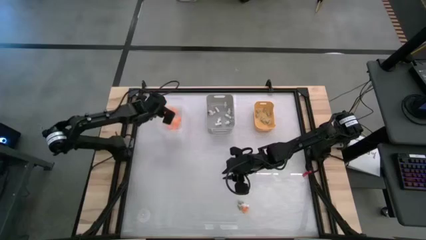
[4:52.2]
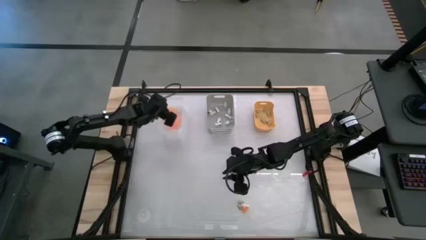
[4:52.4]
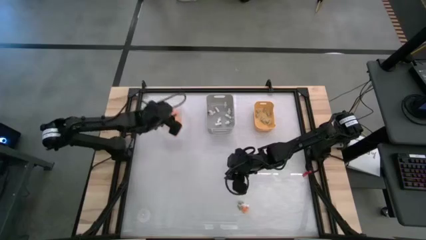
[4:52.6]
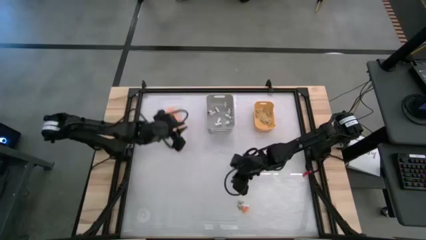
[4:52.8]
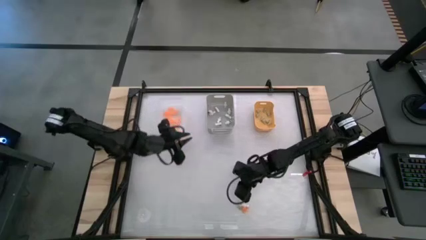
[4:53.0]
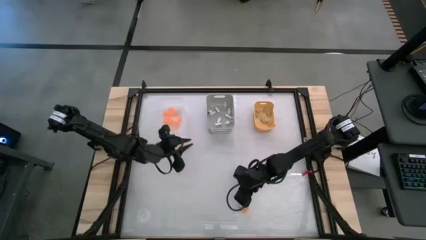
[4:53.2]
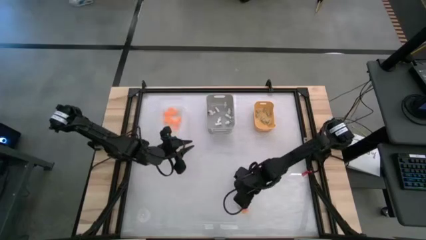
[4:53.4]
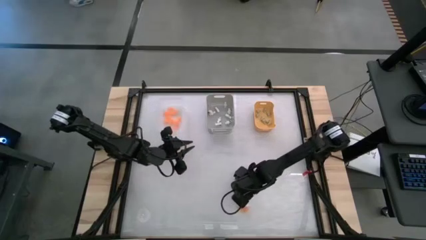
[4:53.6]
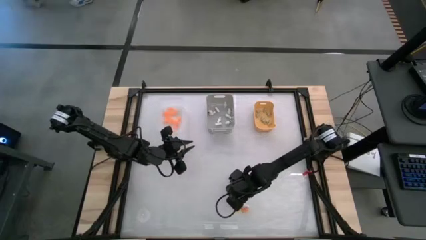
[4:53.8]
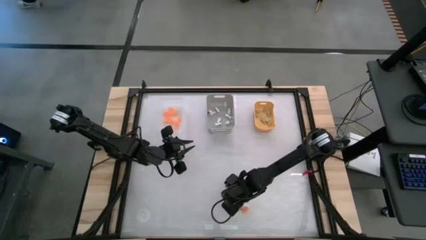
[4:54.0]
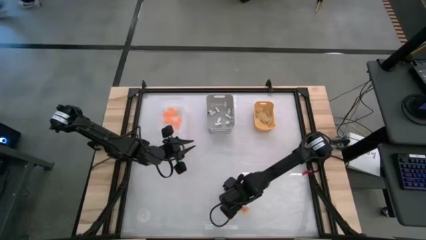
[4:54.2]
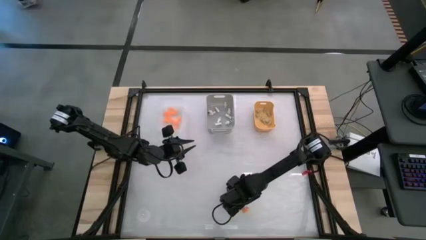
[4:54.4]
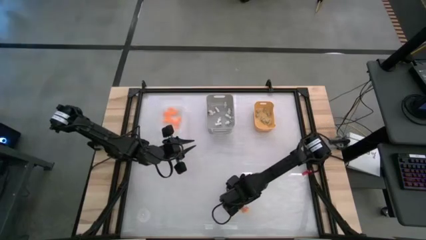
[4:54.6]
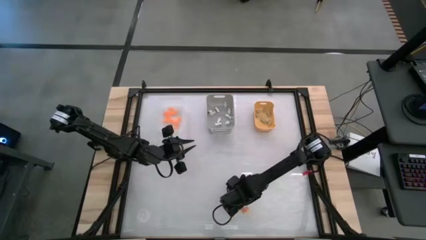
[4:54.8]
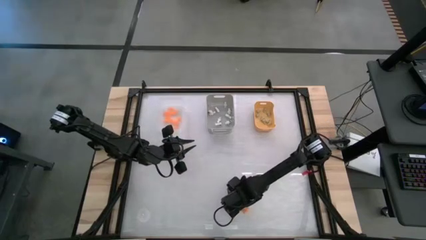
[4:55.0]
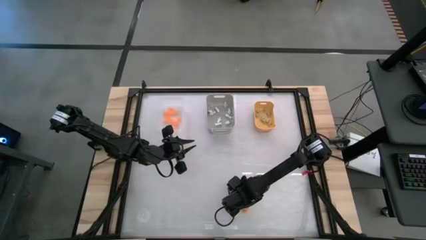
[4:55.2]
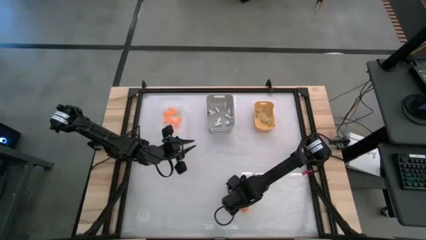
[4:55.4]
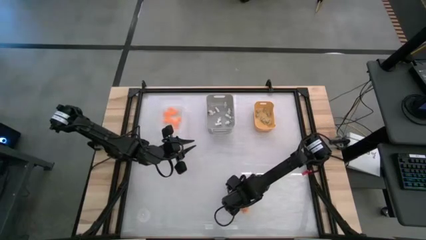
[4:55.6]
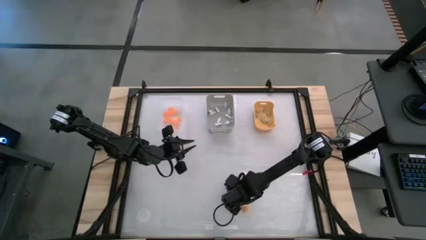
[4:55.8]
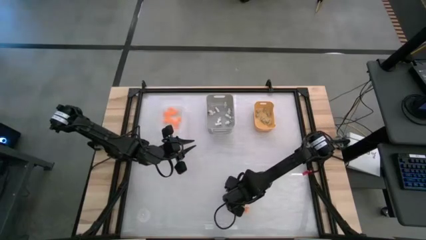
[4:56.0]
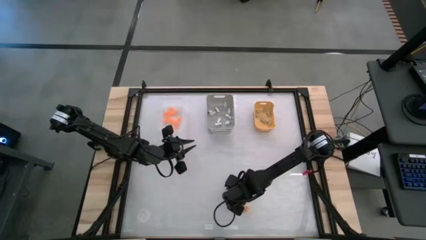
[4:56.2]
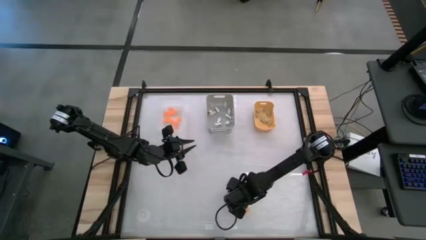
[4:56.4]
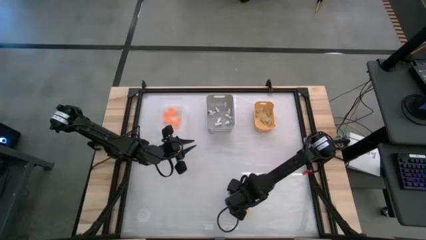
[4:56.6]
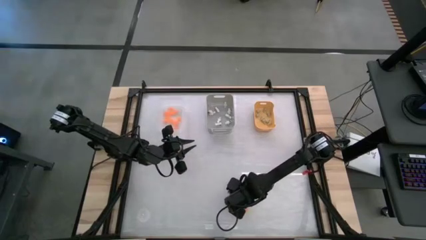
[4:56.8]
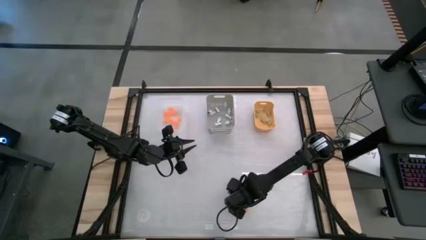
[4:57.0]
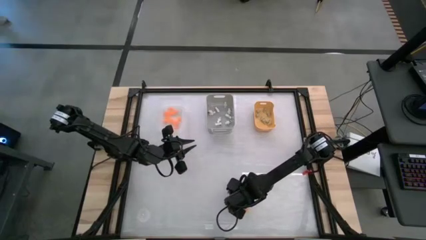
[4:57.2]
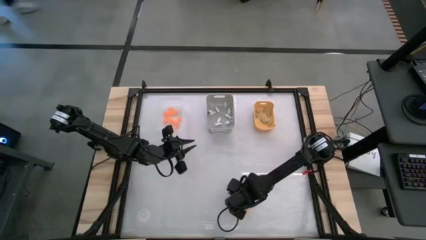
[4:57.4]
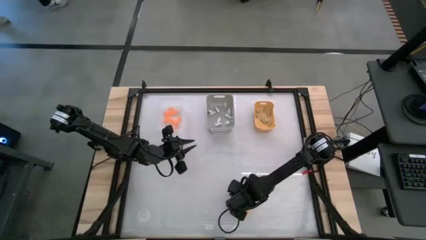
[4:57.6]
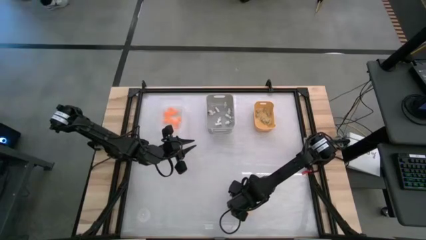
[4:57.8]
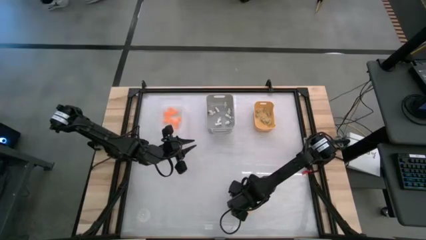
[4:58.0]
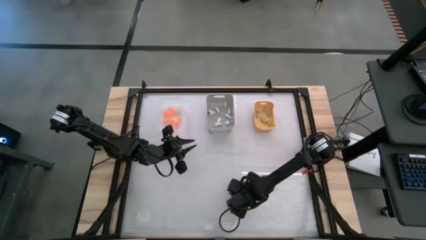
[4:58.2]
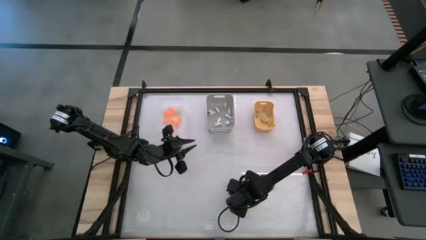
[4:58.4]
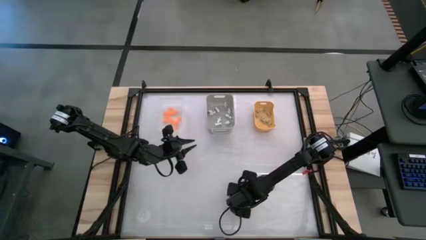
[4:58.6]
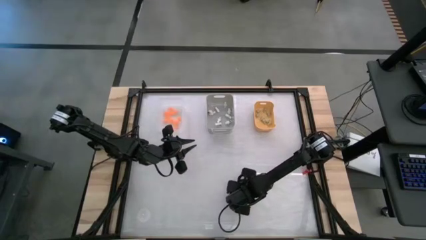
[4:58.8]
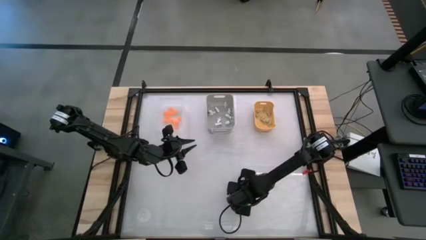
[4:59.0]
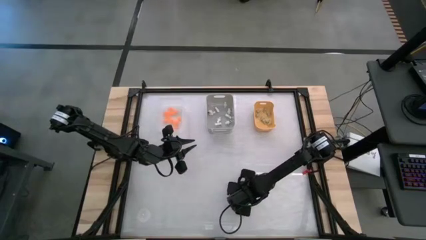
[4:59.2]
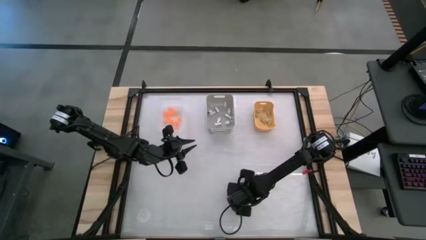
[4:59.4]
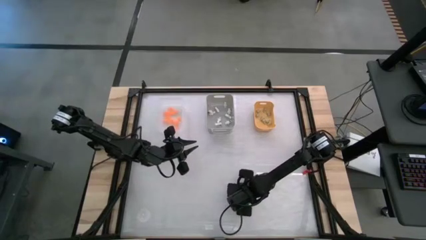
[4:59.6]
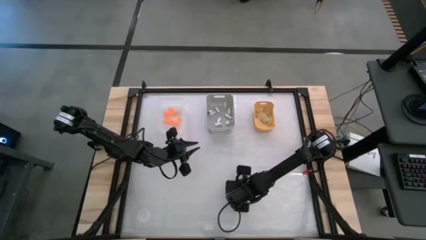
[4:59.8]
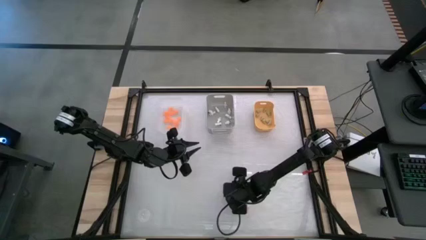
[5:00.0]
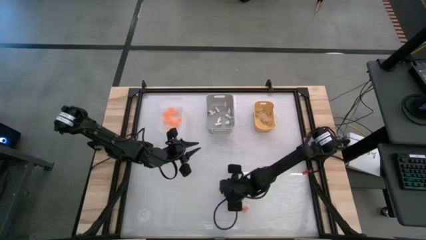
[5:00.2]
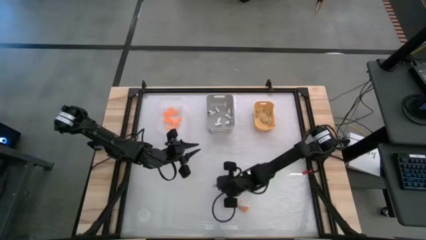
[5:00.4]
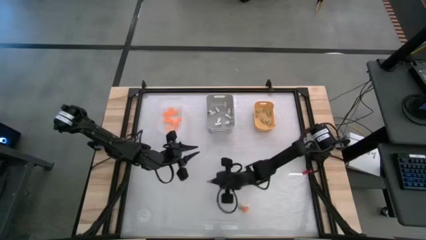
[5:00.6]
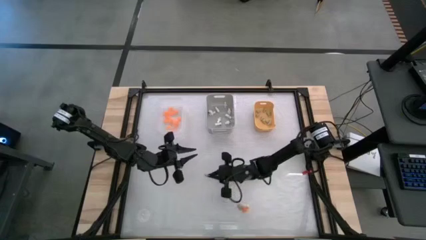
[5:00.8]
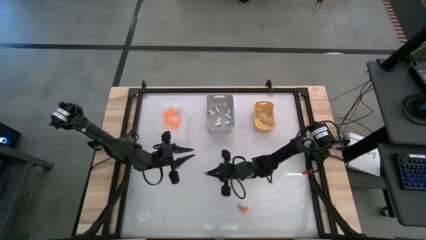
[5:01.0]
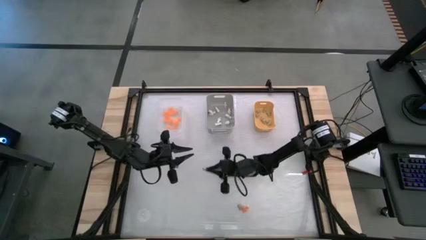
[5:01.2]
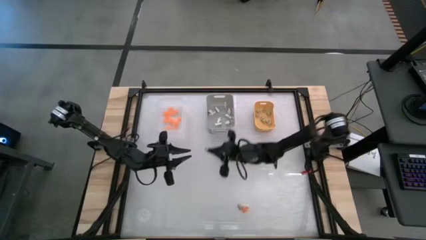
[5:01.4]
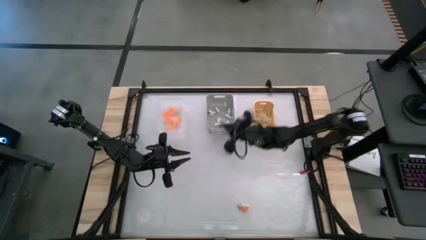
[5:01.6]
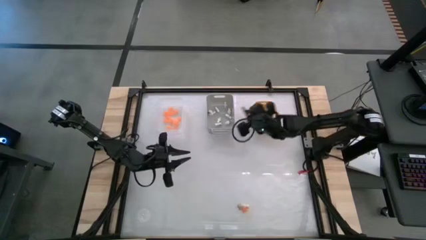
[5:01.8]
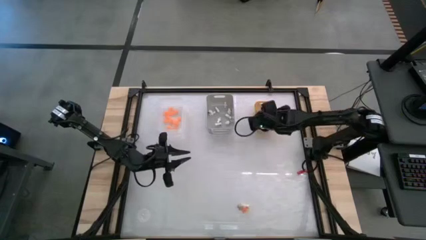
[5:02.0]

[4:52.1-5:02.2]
Task: Sort Halloween decoration
Put the cream white skull toy into the yellow bin

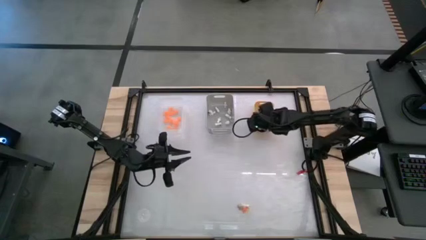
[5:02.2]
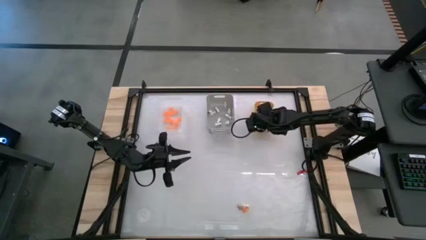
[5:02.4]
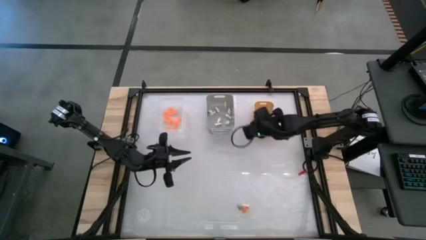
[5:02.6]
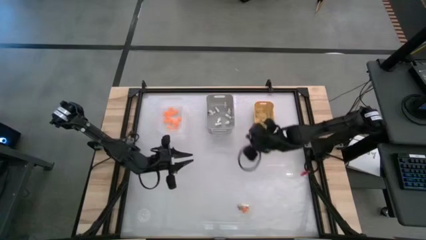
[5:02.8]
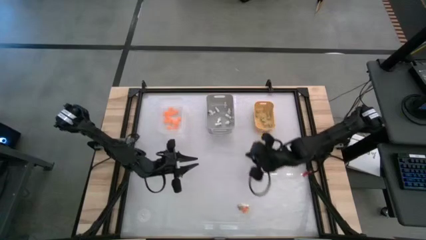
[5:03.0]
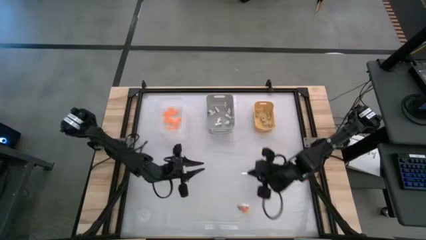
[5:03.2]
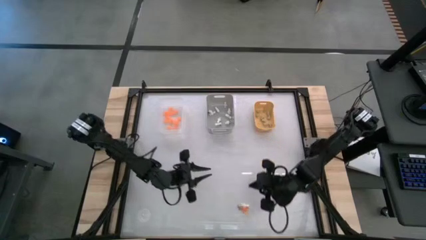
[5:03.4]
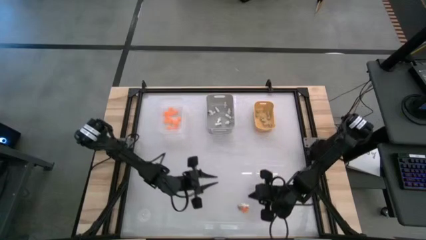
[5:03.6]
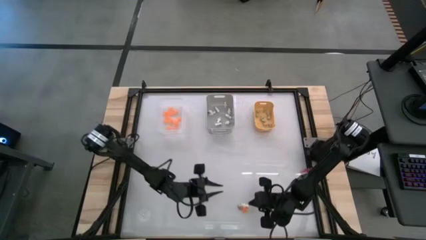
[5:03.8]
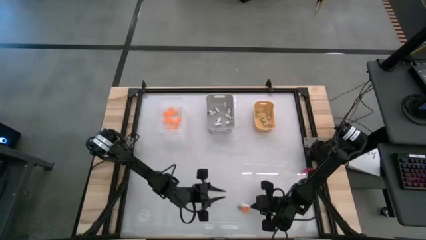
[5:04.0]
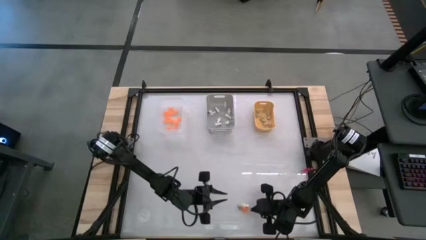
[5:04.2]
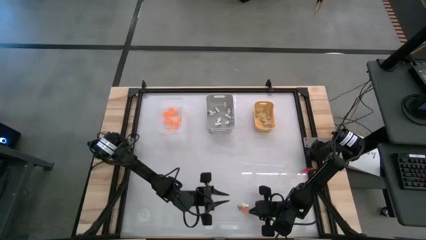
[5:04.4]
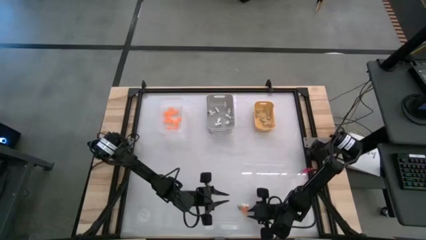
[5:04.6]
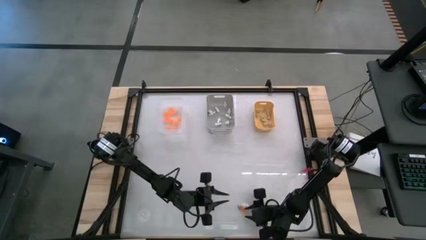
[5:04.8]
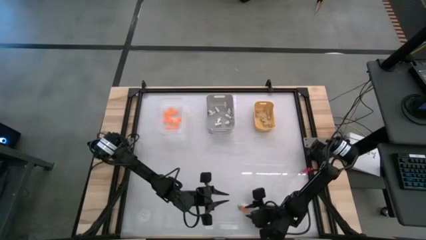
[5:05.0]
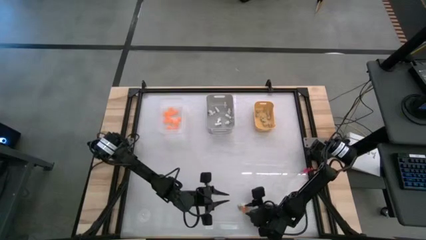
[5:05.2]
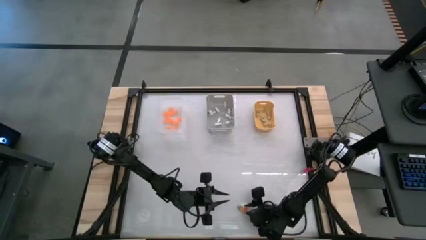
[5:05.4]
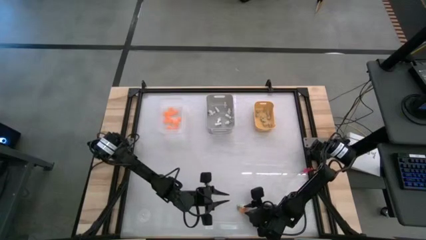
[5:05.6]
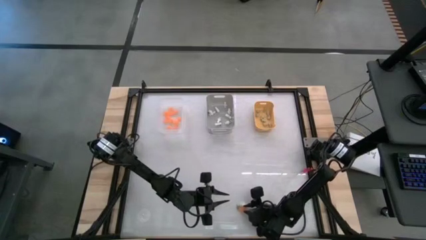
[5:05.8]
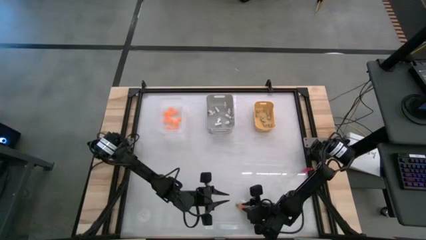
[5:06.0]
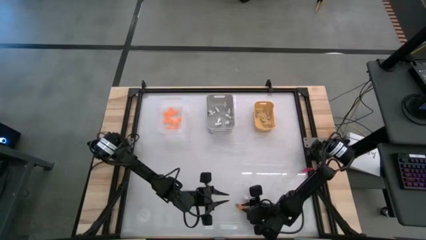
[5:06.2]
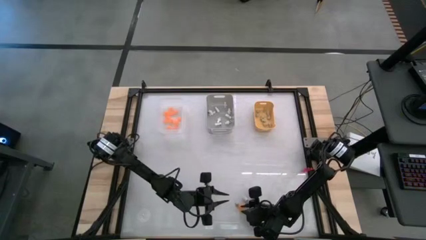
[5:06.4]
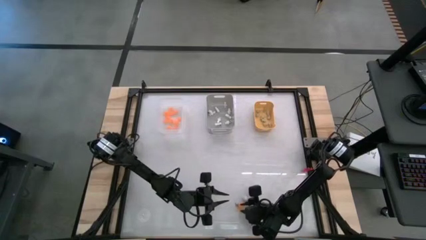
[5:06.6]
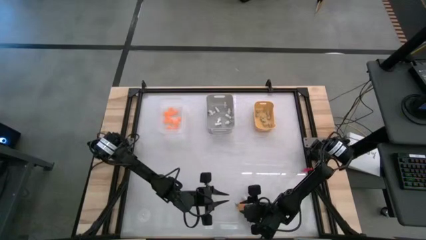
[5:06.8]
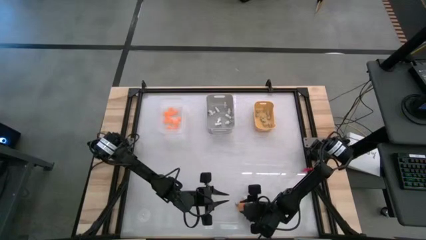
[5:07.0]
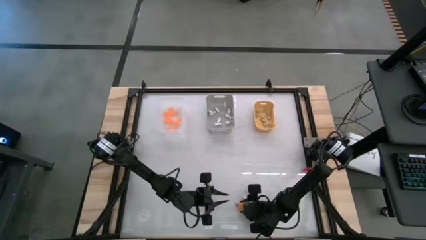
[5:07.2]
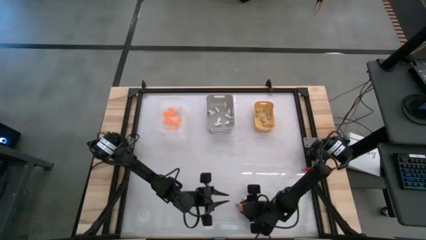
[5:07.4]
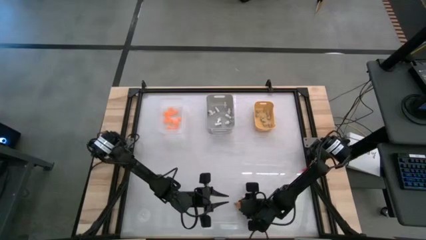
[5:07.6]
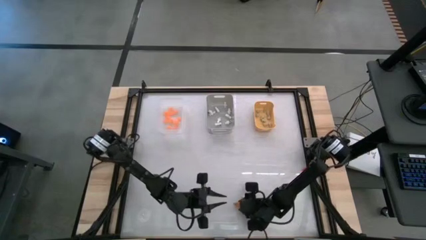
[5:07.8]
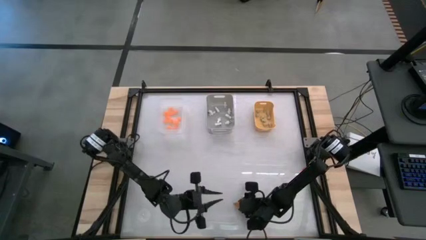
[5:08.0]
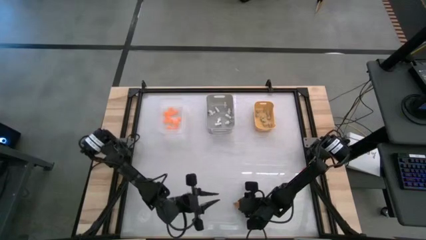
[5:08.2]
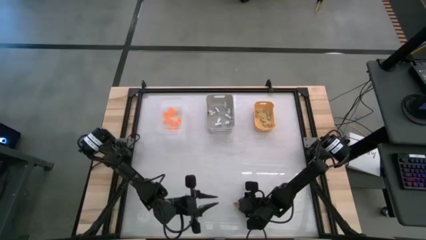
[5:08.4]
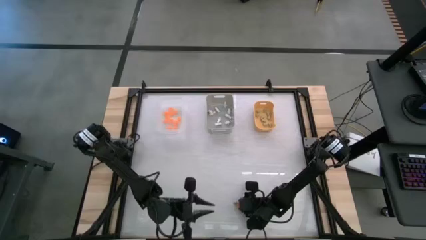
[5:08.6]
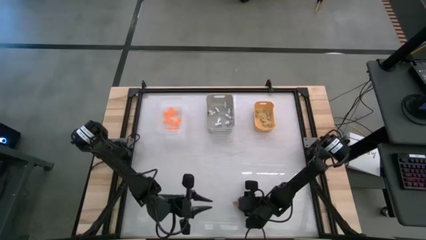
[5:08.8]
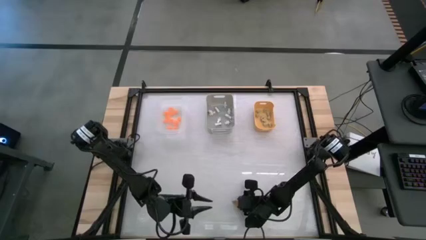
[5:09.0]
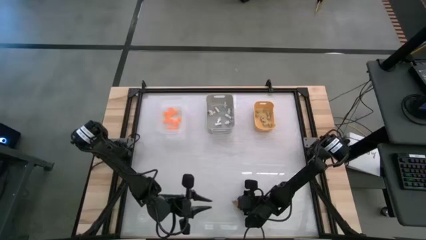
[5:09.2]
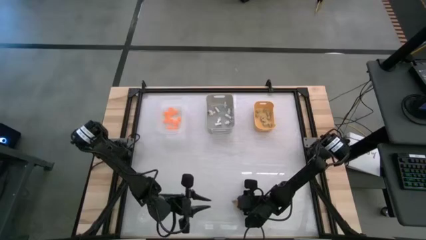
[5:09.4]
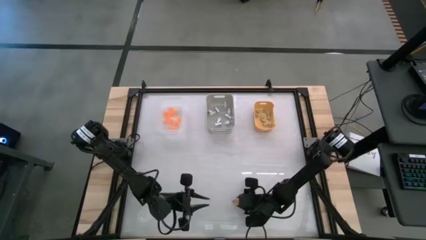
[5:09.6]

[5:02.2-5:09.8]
Put the orange spider toy into the transparent white bin
